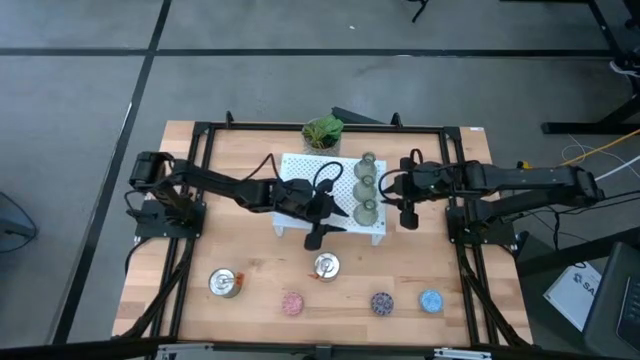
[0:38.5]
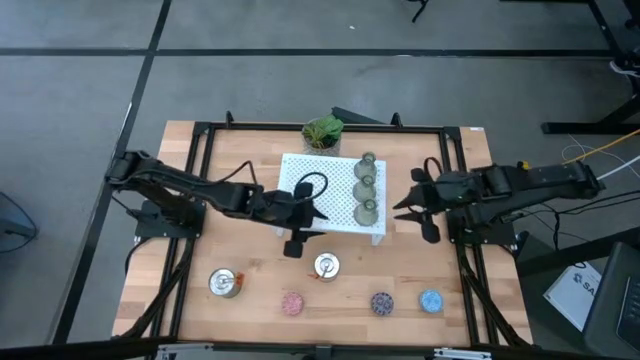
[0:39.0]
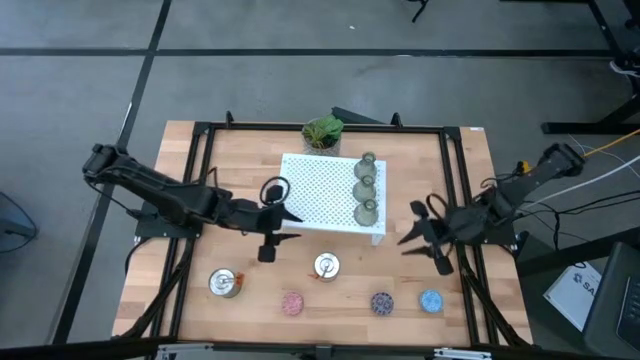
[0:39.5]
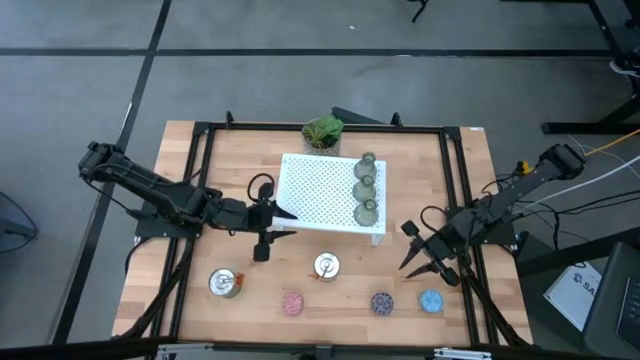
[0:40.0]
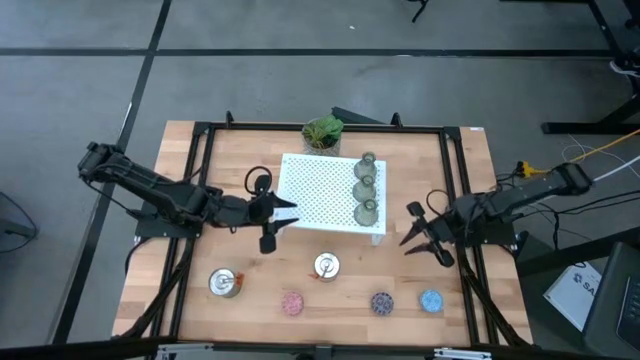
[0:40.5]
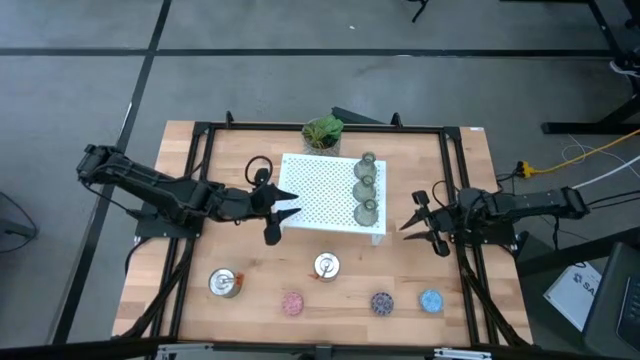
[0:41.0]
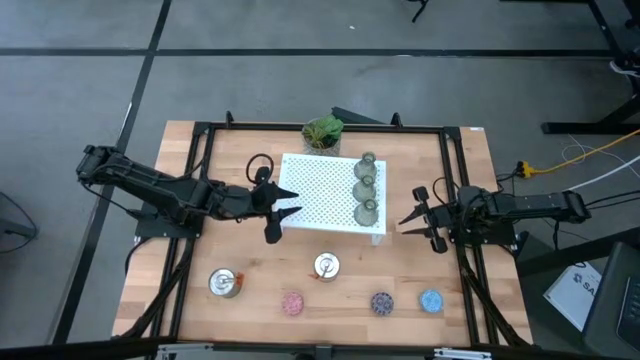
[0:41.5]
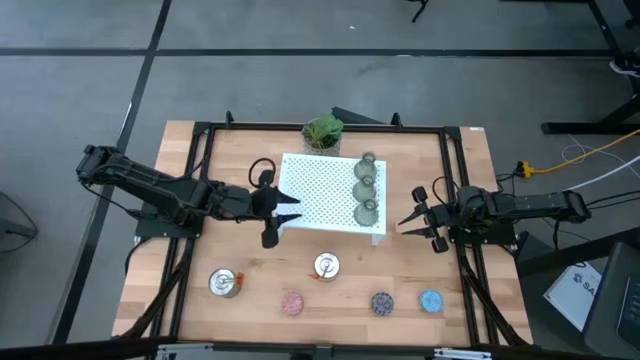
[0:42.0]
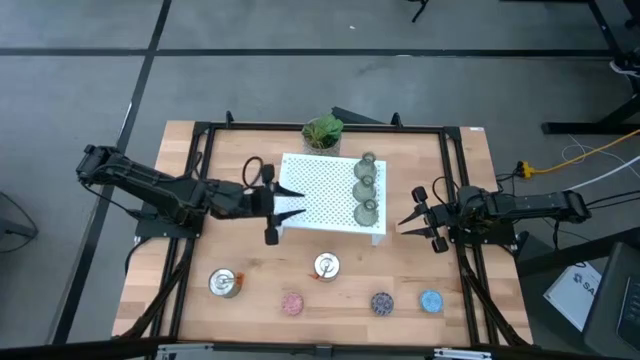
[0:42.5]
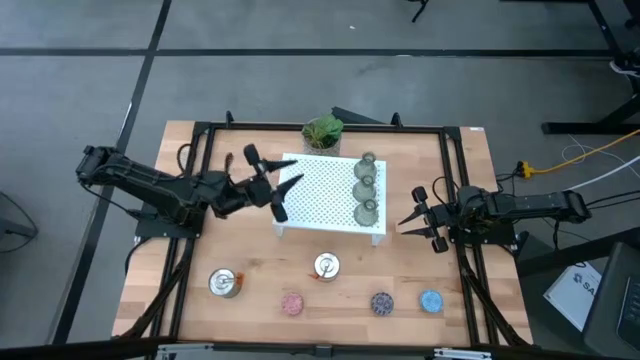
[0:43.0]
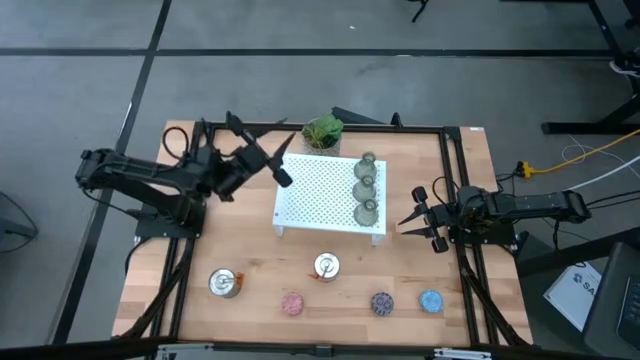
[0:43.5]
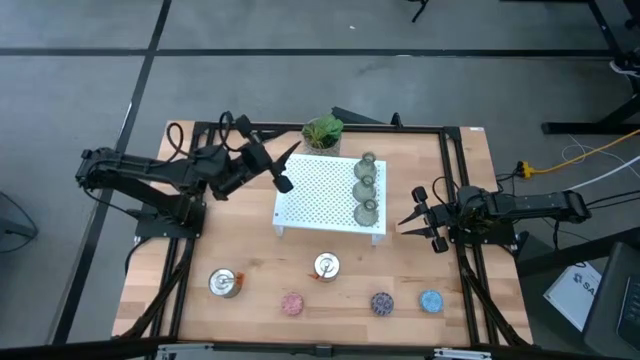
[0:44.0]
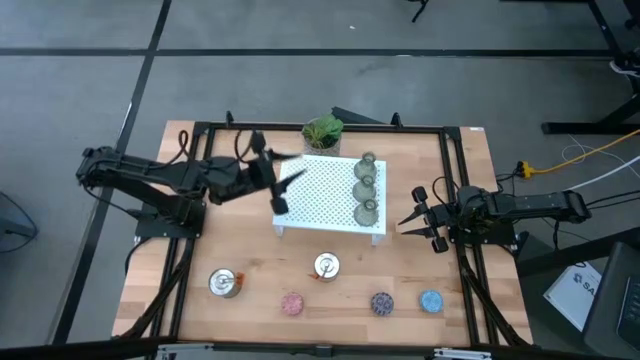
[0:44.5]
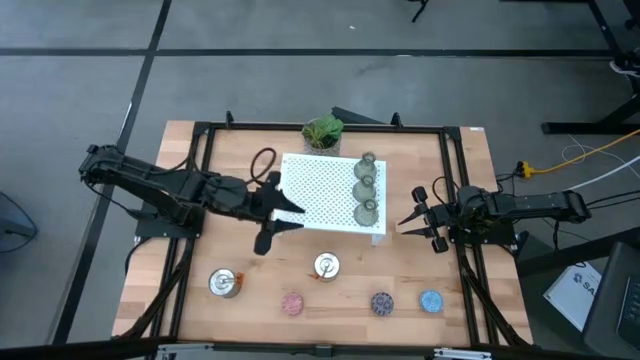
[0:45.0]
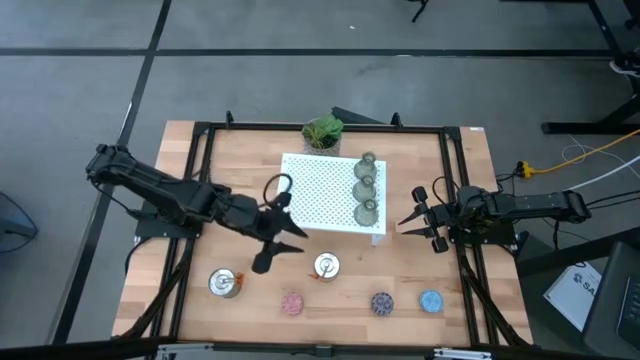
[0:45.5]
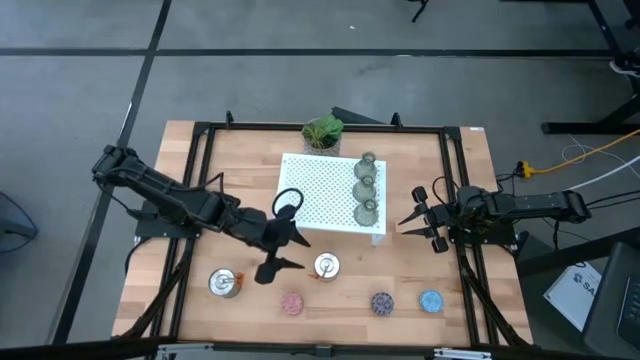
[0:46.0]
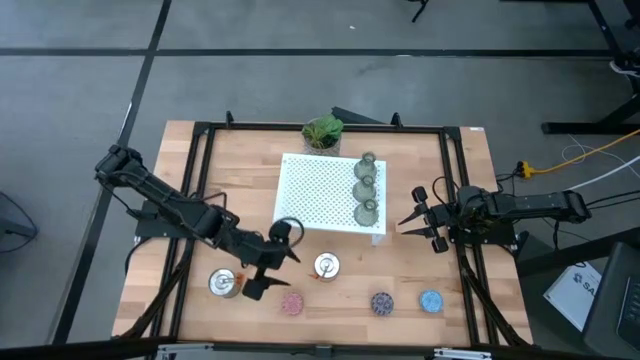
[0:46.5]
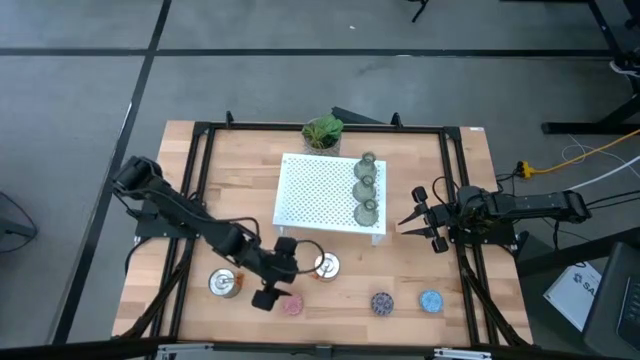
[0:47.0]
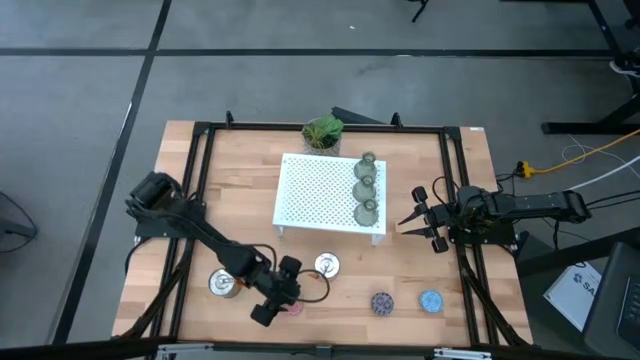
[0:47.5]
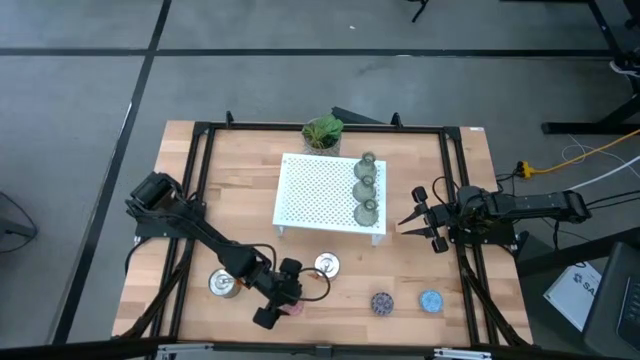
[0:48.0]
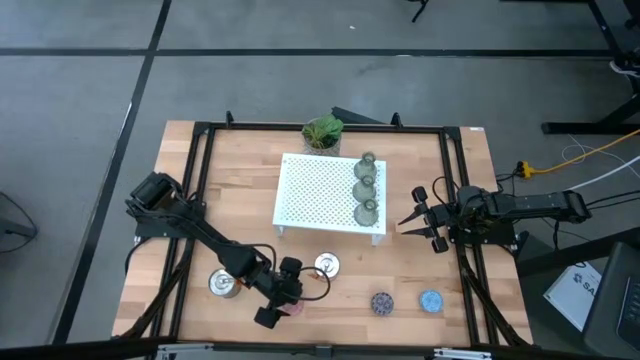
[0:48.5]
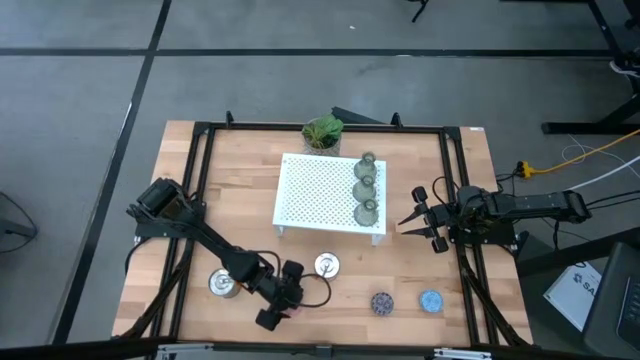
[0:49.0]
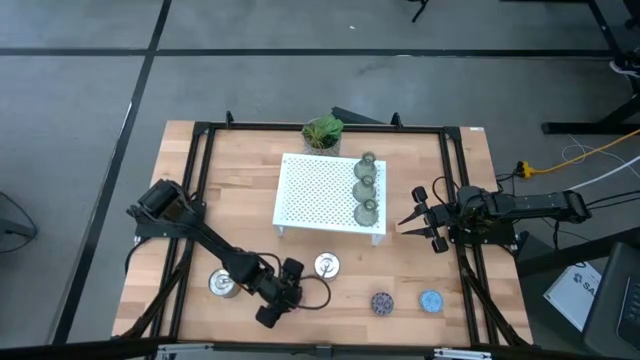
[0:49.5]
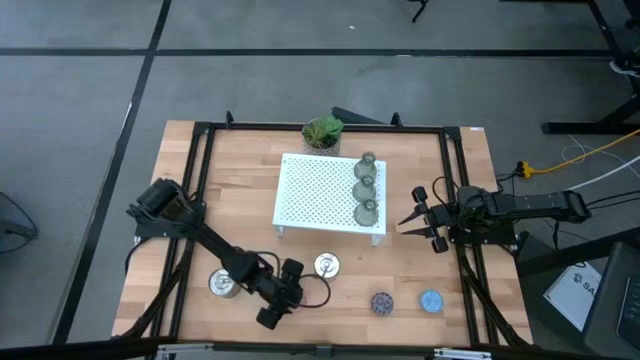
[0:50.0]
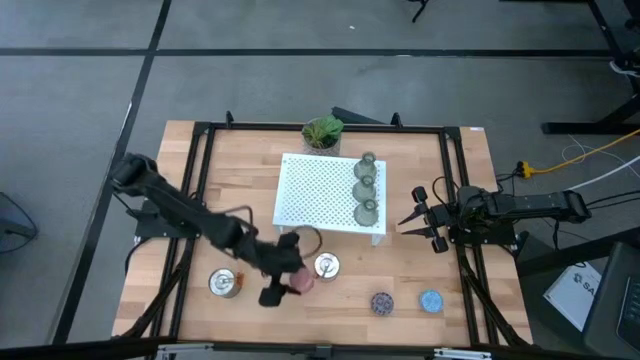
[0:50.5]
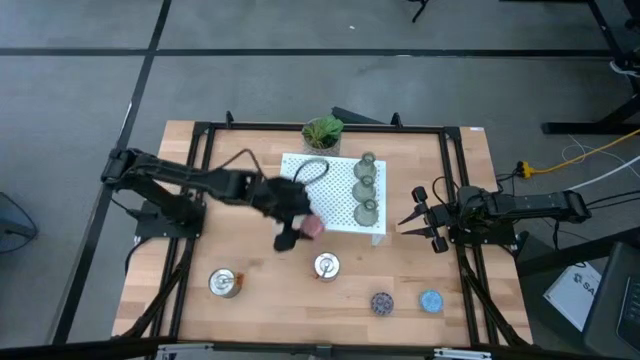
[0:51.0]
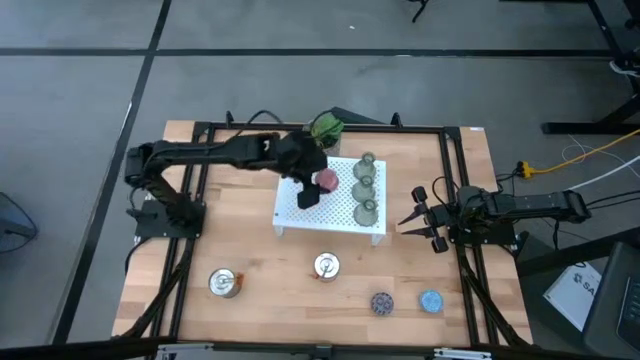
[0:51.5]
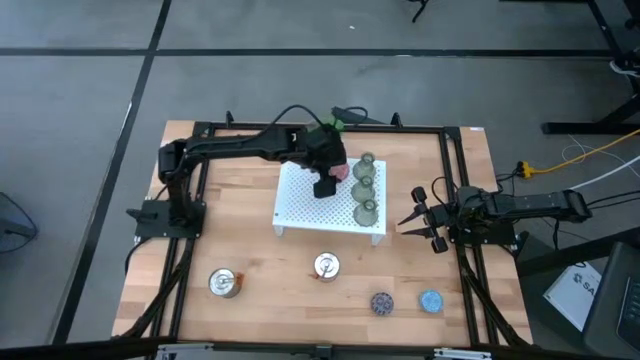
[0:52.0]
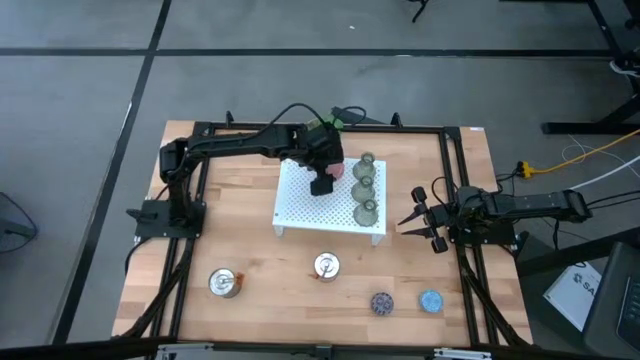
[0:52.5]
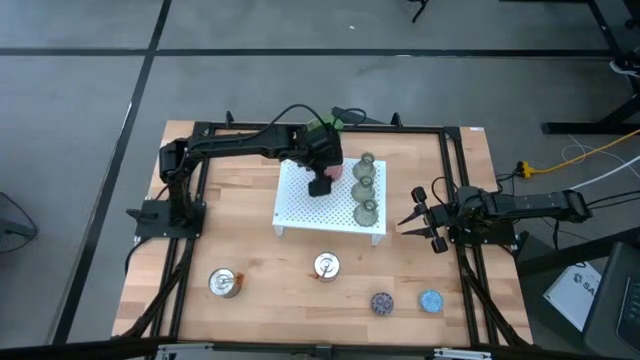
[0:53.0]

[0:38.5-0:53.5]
Task: Stock candles and vases on shelf
Put the pink patterned scented candle on the shelf

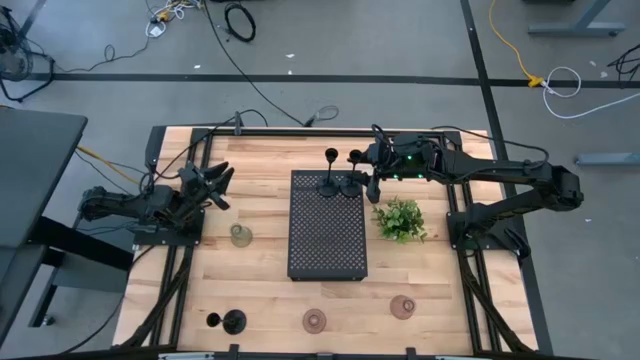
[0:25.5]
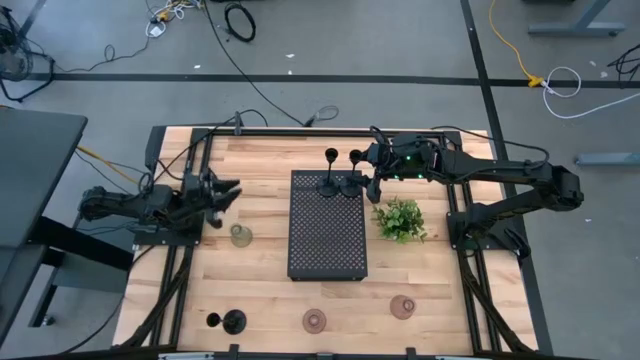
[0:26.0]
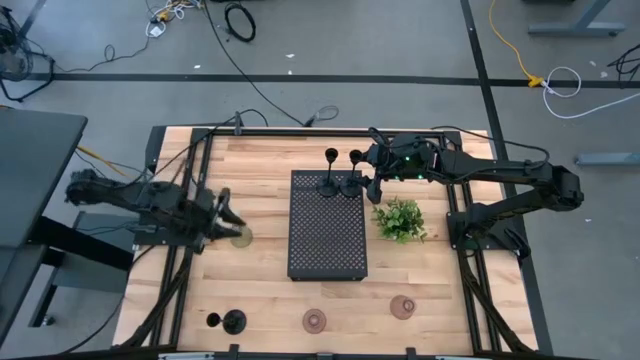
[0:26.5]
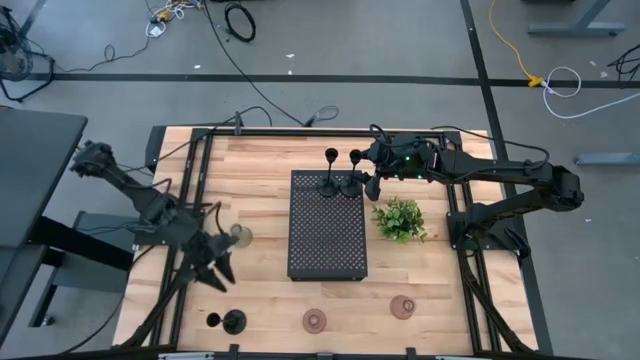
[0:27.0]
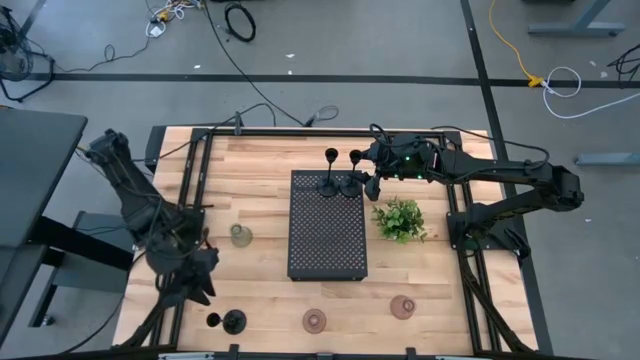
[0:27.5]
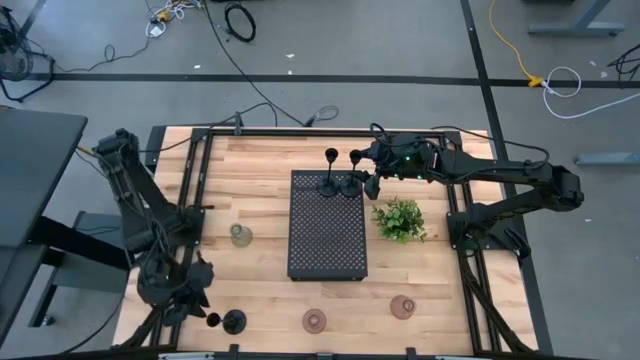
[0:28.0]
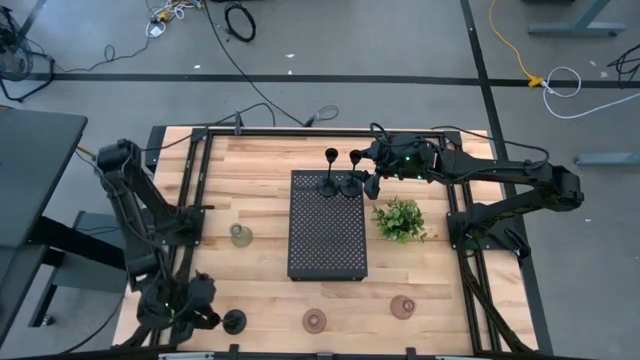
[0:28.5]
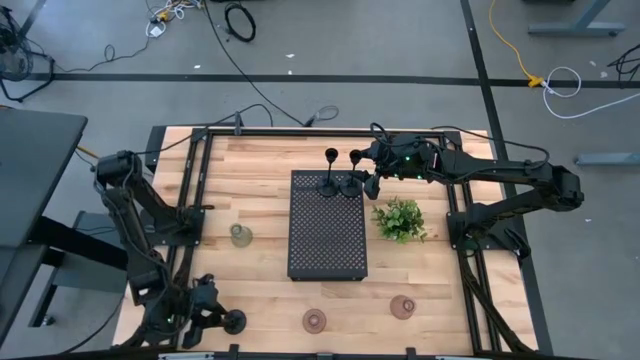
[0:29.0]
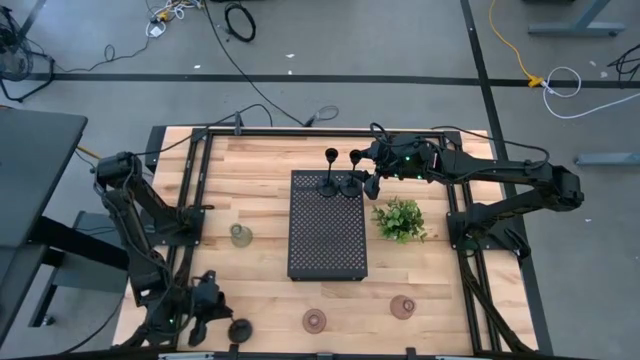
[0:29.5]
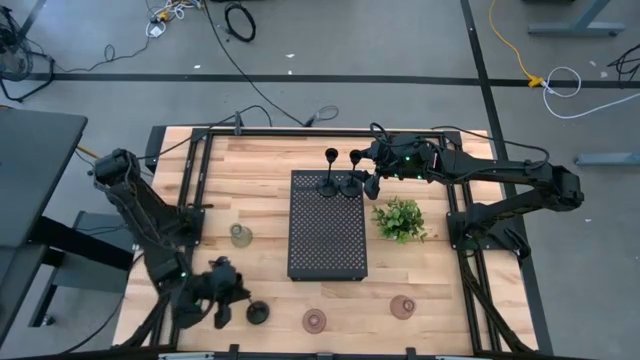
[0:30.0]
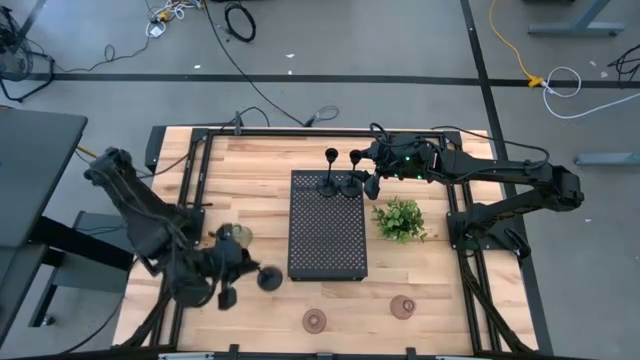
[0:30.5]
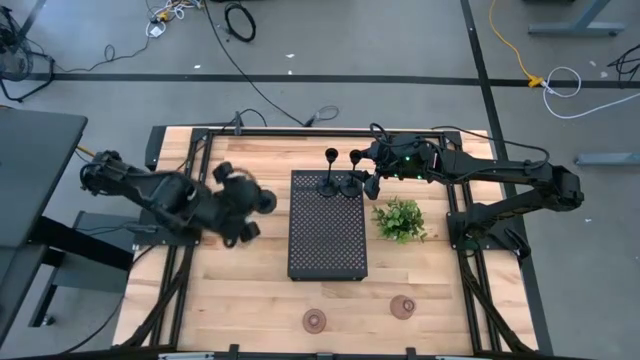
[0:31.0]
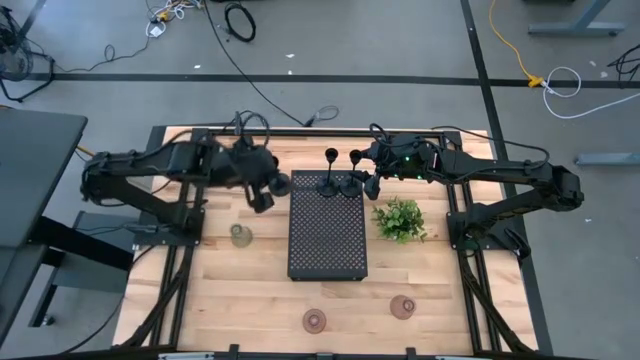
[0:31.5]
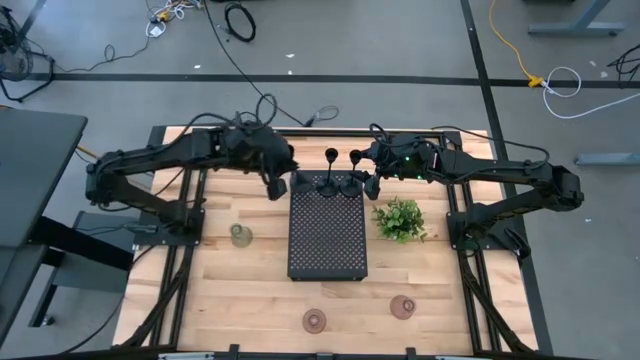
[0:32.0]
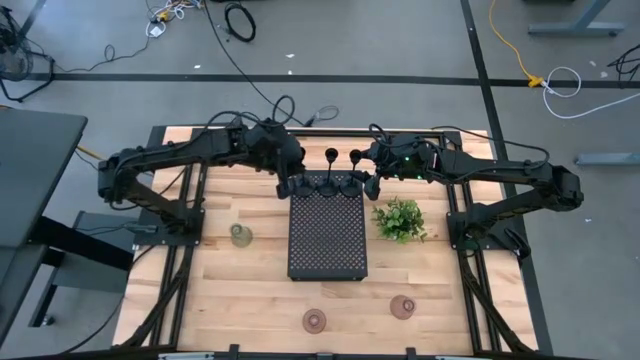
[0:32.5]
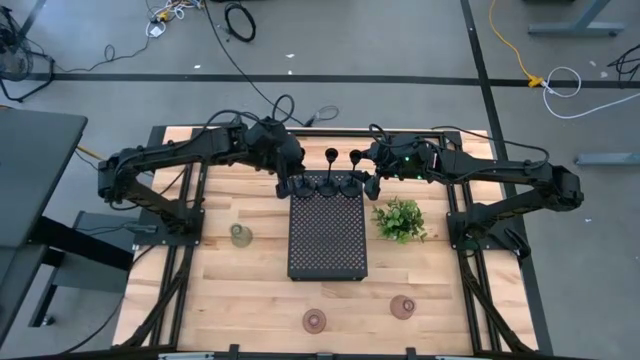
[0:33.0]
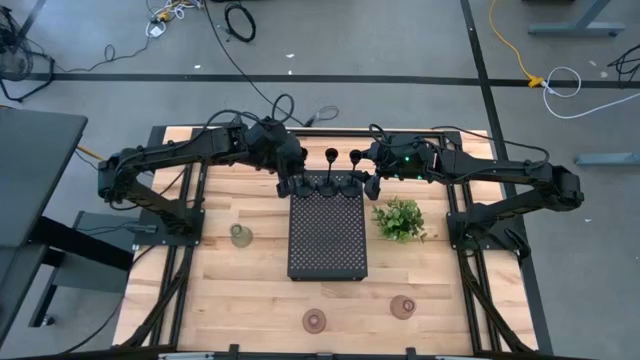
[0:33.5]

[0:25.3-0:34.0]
Task: Pick & Place candle stick holders
Put the black candle holder on the shelf
